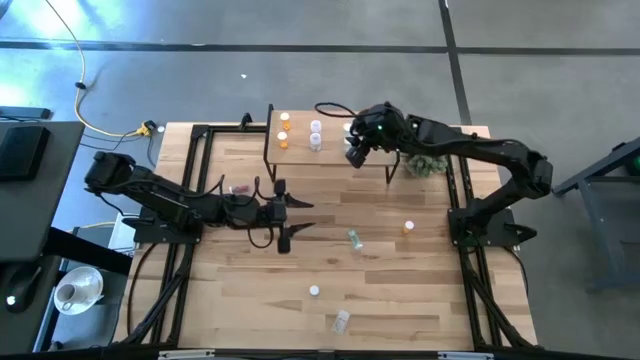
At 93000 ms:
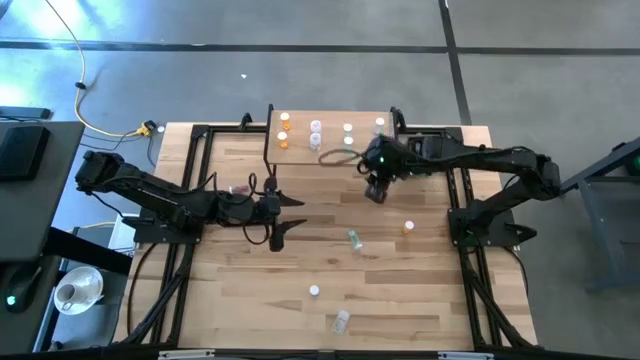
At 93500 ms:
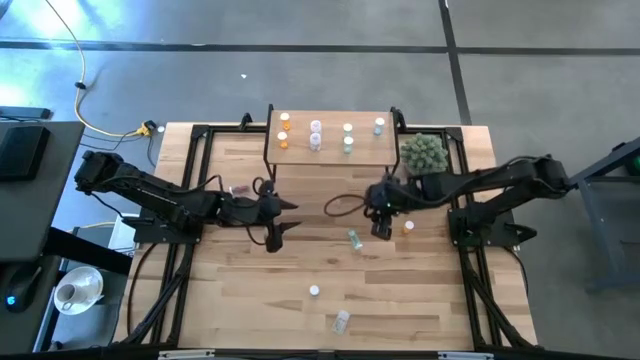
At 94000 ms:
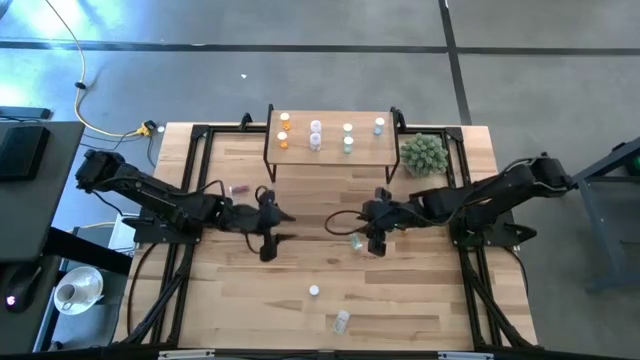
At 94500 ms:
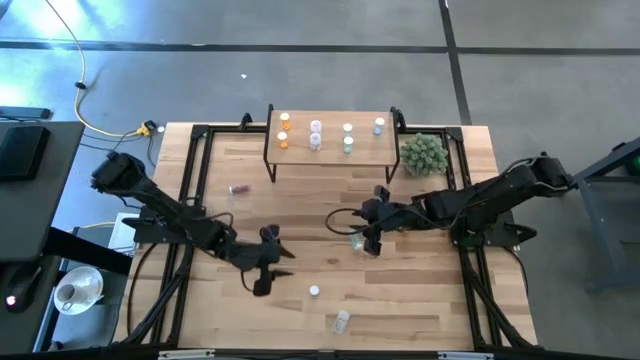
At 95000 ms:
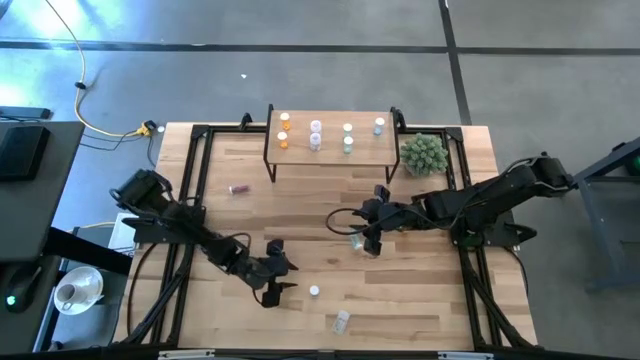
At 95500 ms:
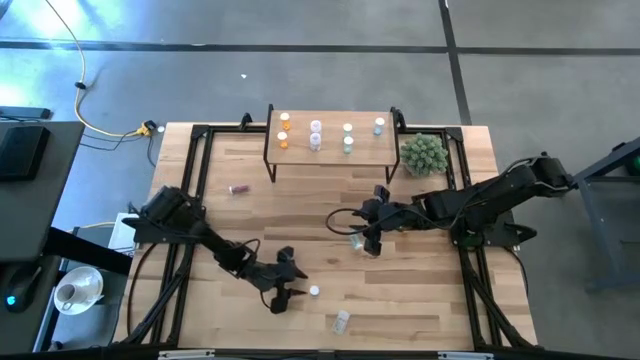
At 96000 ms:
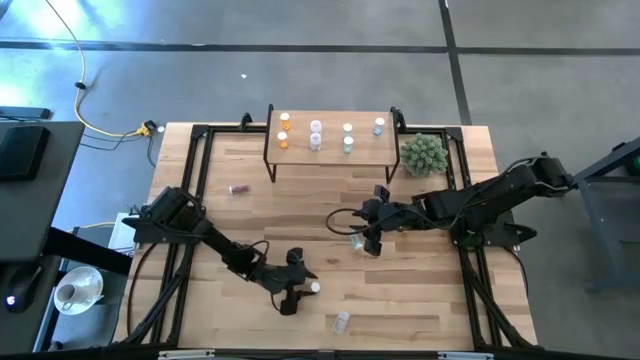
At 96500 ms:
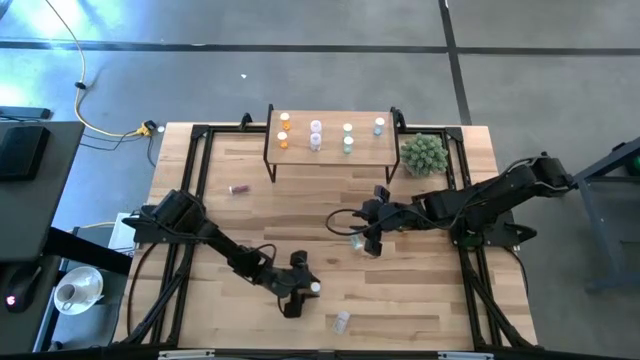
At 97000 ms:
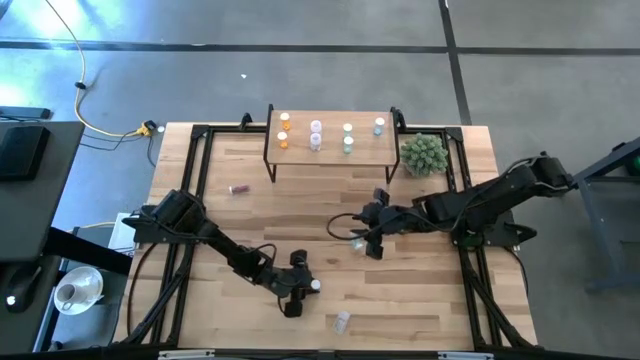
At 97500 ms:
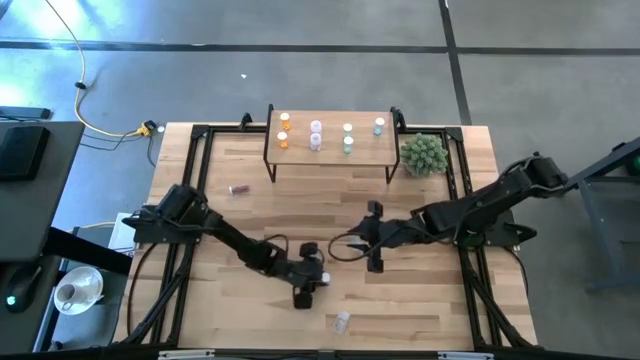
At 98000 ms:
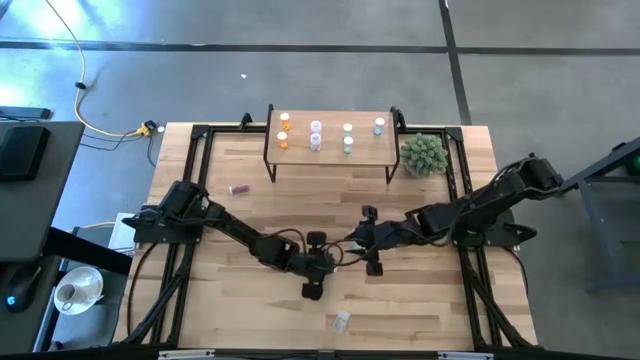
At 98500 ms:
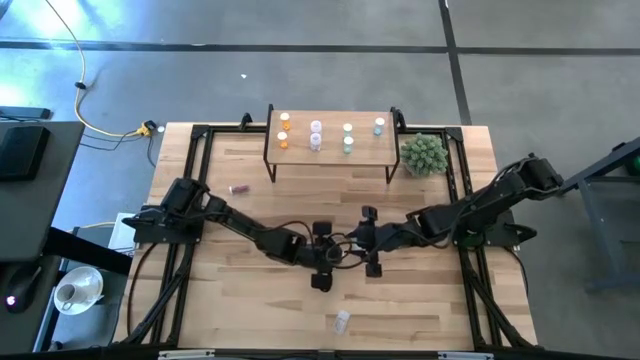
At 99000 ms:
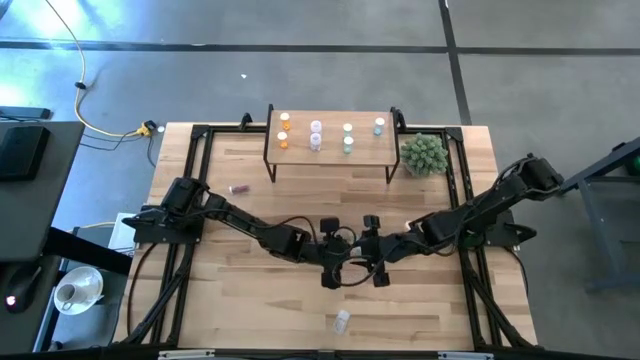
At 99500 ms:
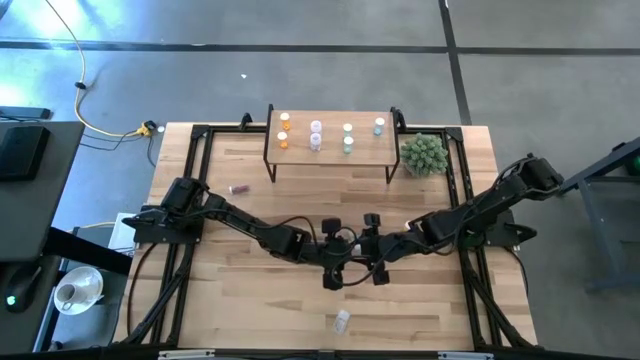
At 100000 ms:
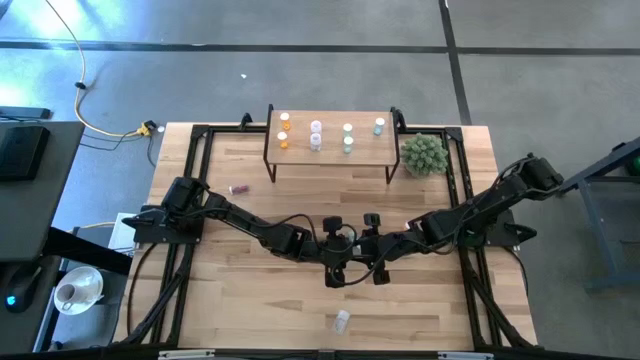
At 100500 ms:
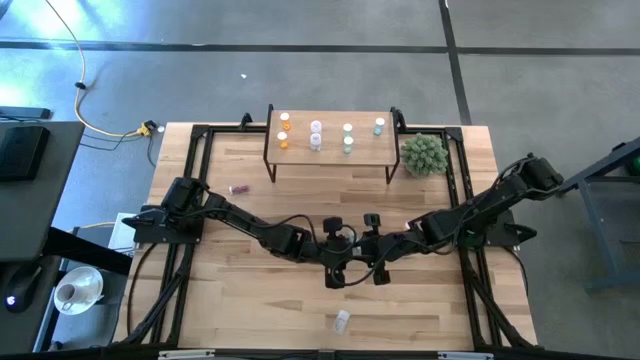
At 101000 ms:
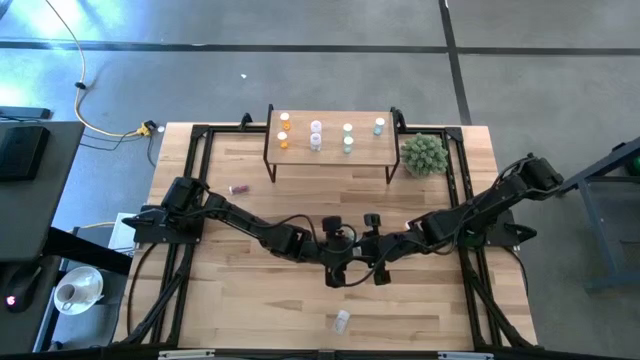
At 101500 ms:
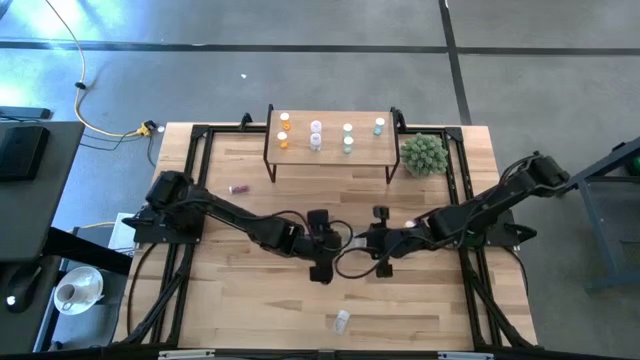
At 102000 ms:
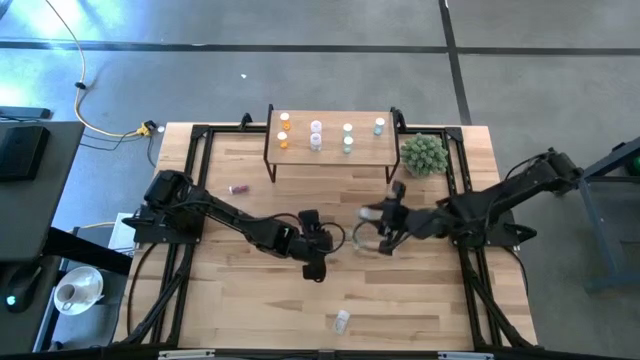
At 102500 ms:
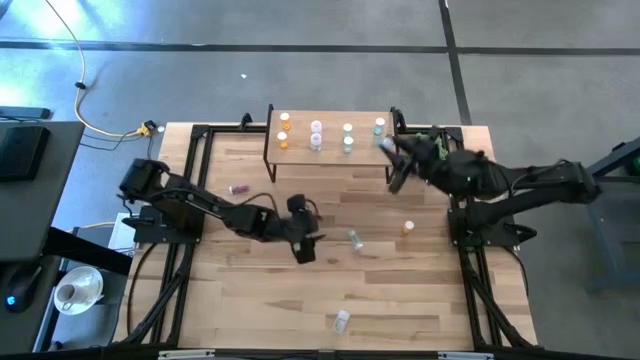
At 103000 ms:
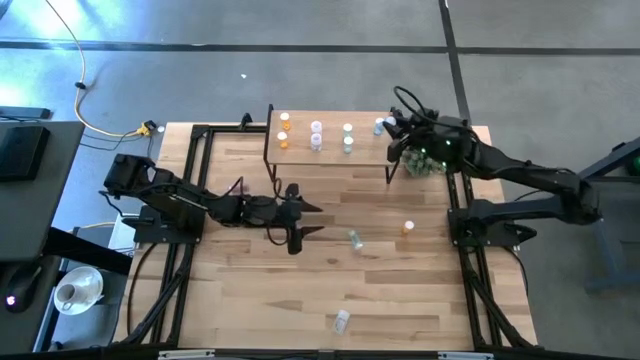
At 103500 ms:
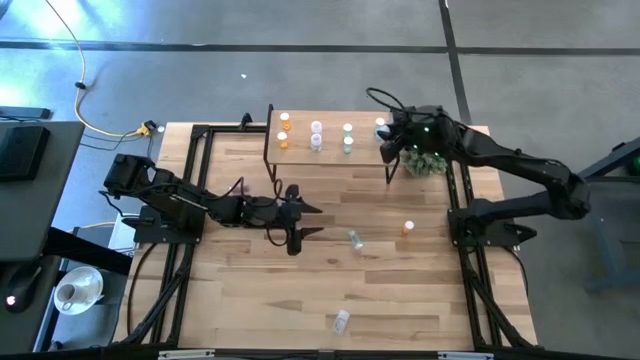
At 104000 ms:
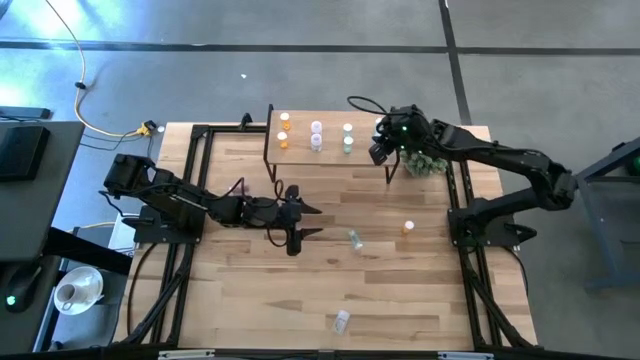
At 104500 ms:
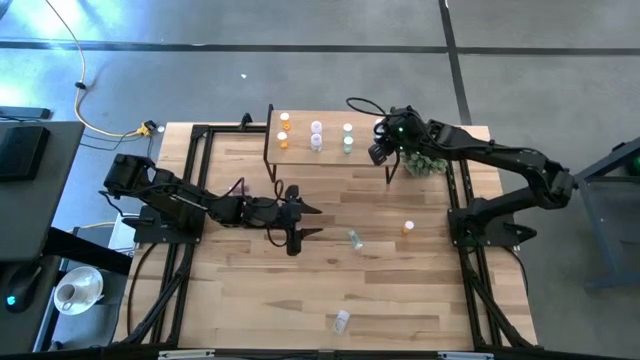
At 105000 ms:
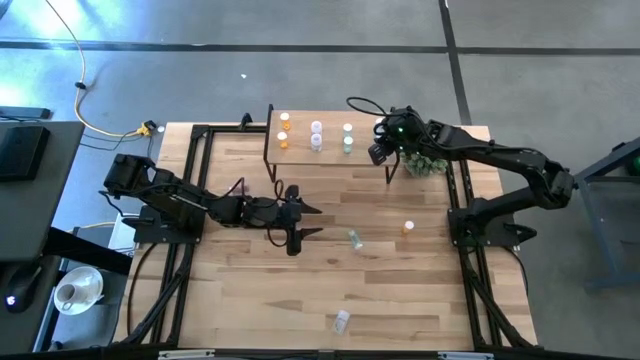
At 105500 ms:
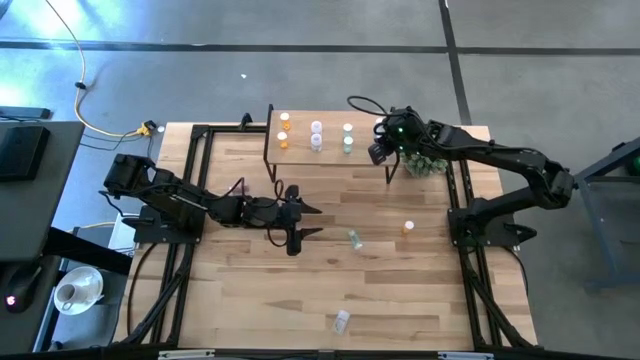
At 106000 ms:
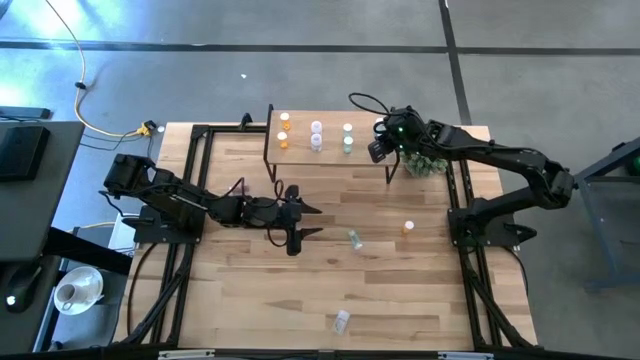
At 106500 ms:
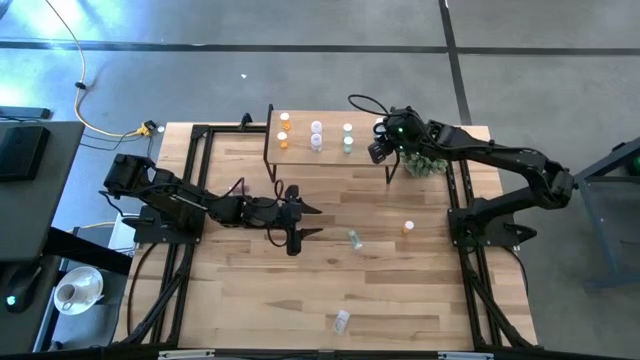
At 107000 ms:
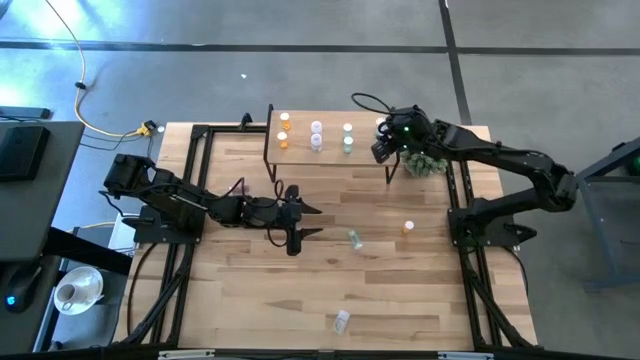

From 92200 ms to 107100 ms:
Task: Pick and place medicine bottles onto shelf by color
Put the blue pill bottle on the shelf and aligned with the other blue pill bottle

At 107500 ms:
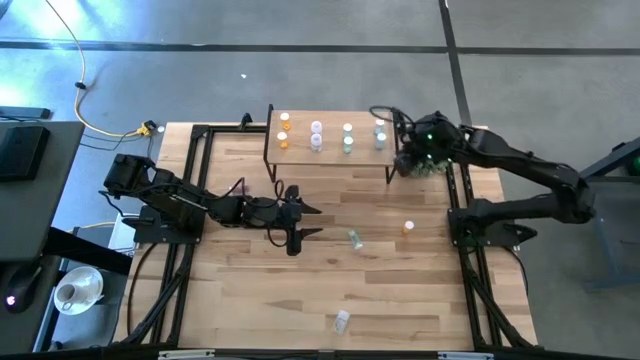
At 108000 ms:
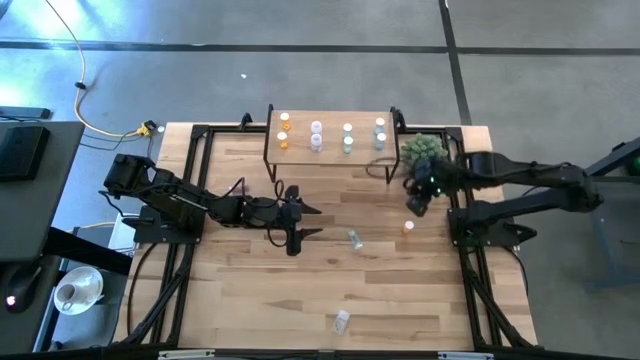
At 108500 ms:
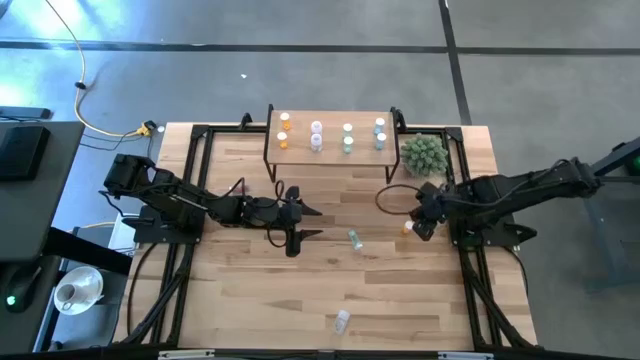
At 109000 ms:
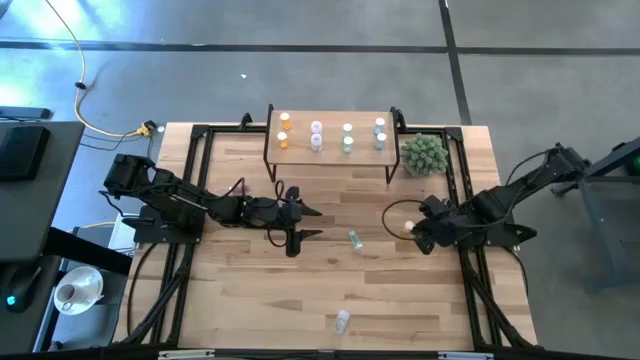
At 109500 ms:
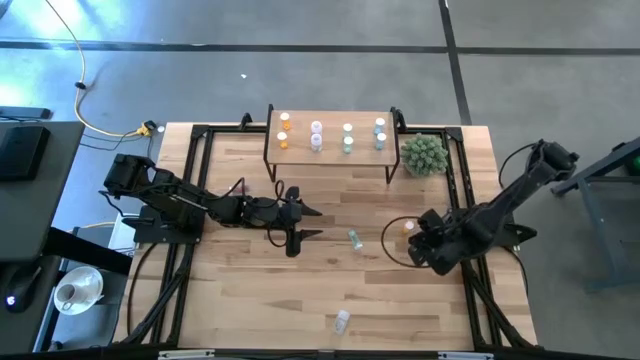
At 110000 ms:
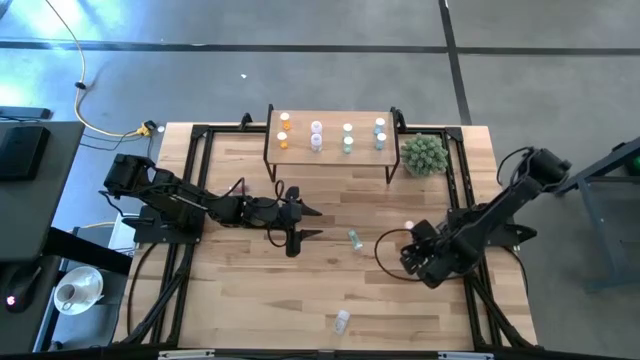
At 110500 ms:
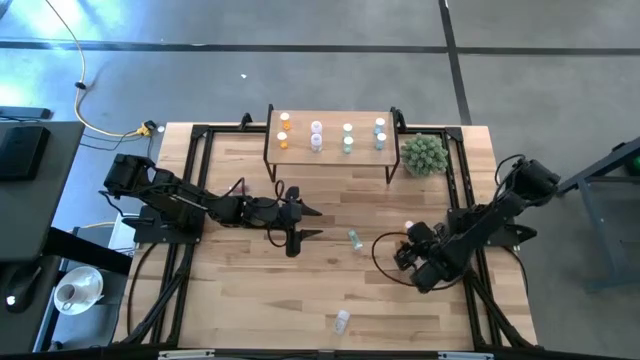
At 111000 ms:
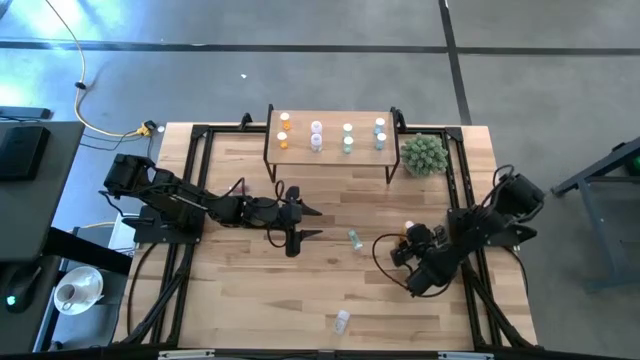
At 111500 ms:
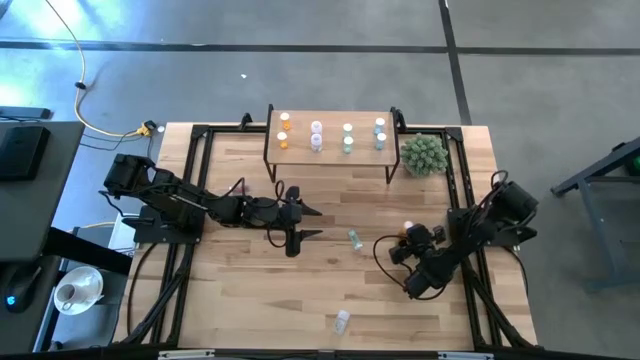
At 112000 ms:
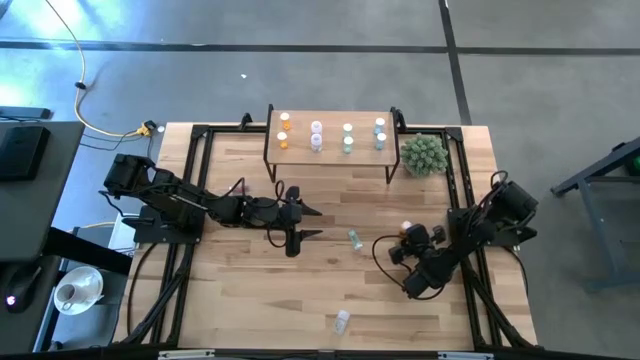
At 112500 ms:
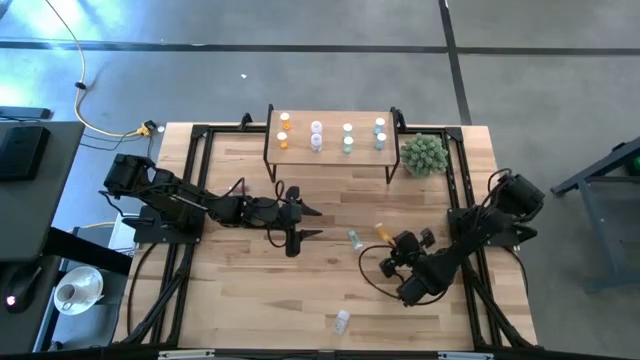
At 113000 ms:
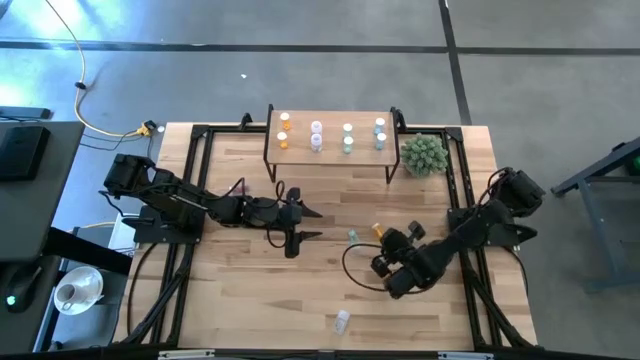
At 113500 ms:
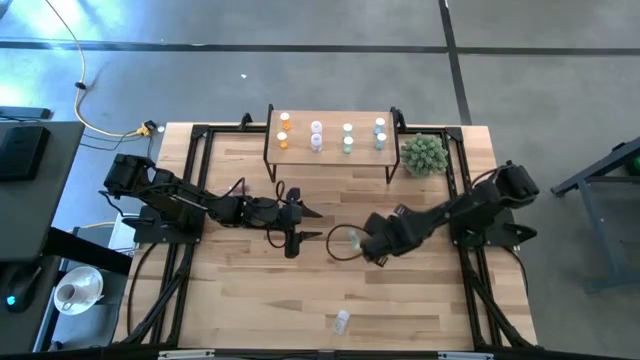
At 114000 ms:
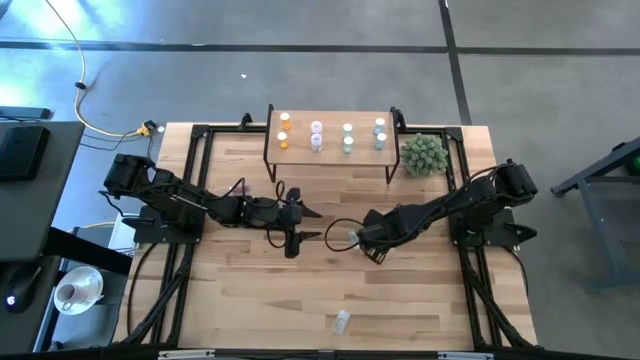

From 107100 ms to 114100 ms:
Put the orange pill bottle on the shelf and aligned with the other orange pill bottles
